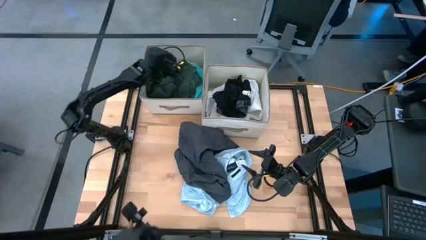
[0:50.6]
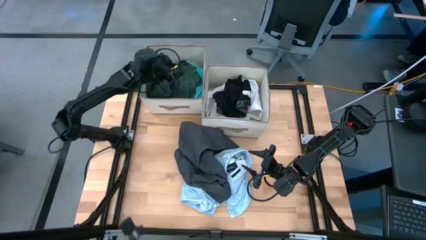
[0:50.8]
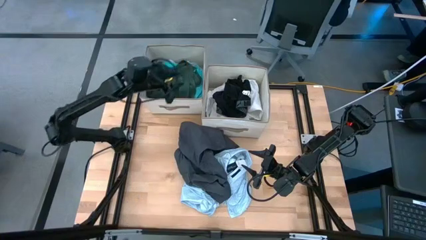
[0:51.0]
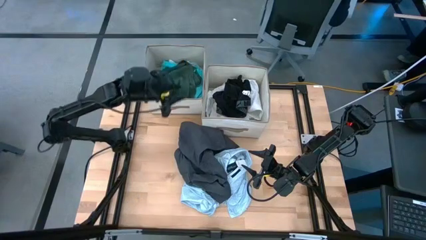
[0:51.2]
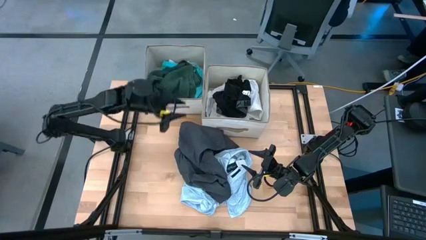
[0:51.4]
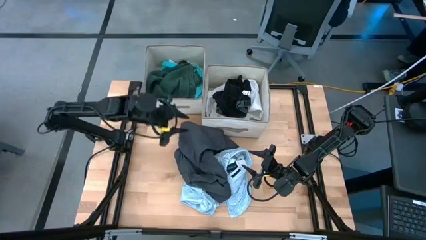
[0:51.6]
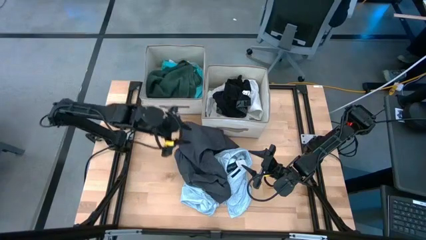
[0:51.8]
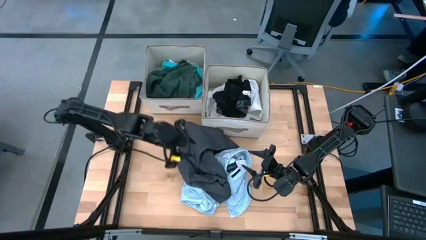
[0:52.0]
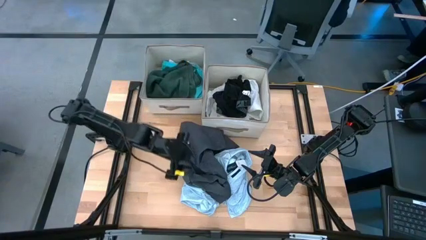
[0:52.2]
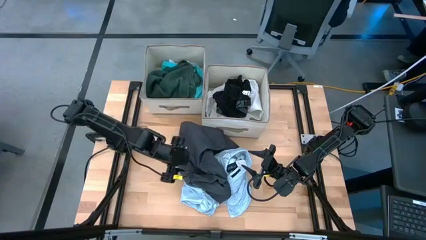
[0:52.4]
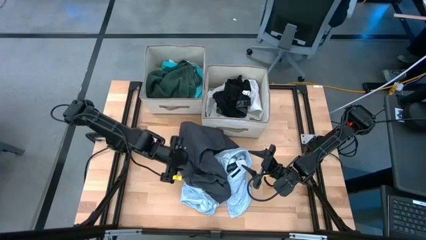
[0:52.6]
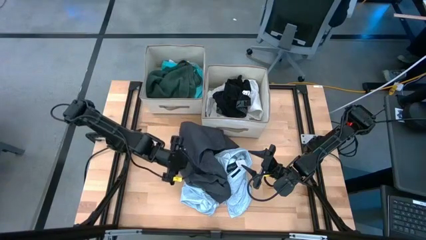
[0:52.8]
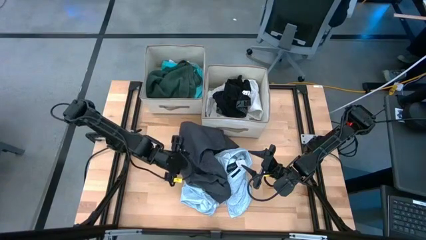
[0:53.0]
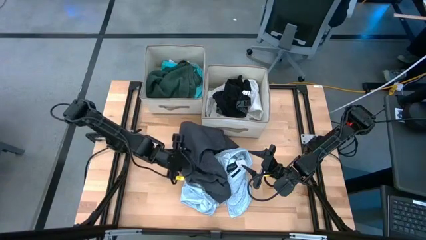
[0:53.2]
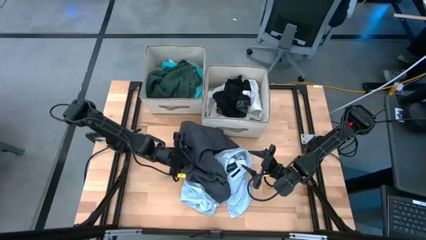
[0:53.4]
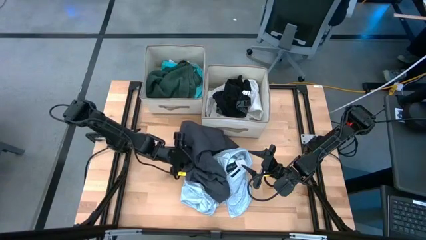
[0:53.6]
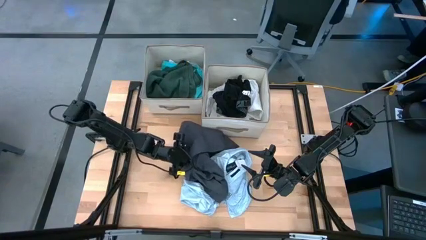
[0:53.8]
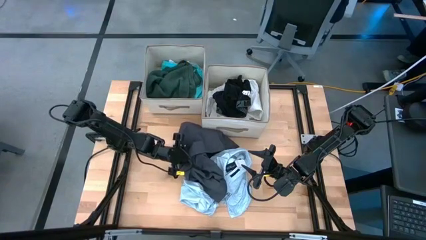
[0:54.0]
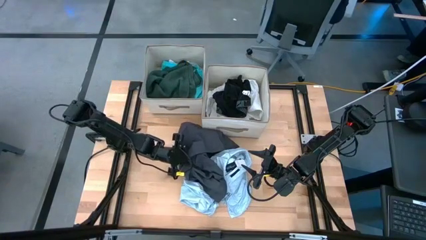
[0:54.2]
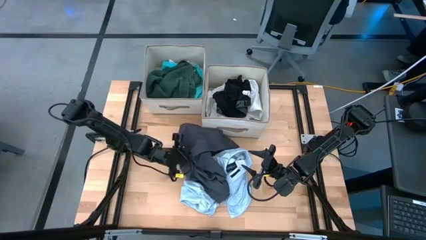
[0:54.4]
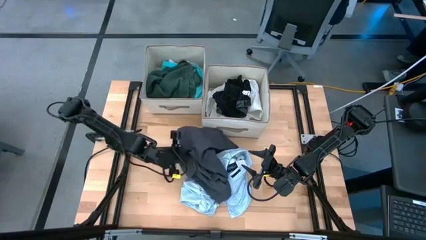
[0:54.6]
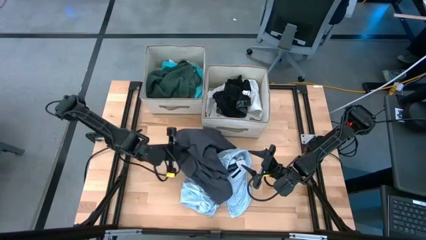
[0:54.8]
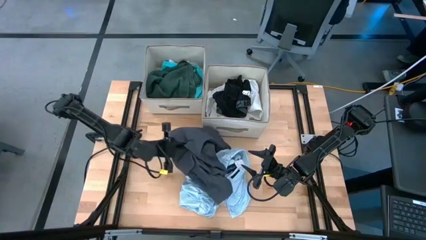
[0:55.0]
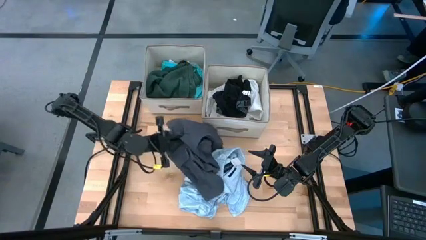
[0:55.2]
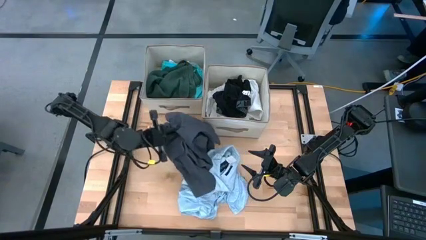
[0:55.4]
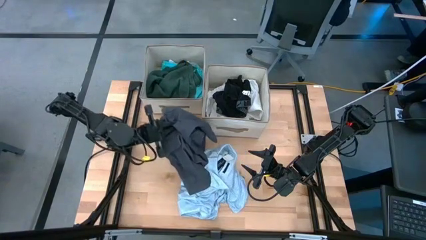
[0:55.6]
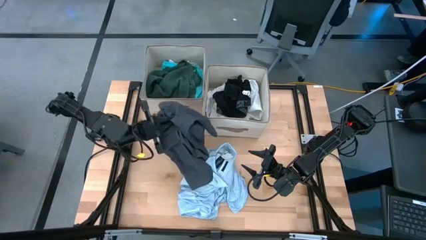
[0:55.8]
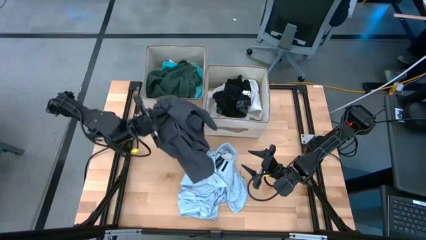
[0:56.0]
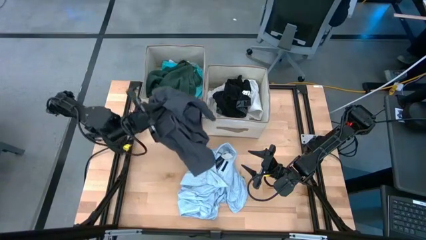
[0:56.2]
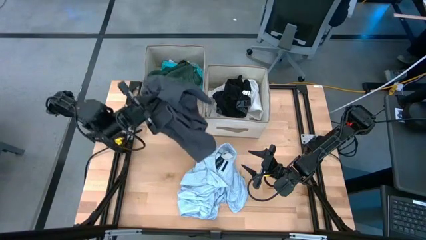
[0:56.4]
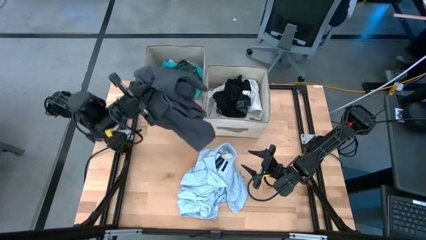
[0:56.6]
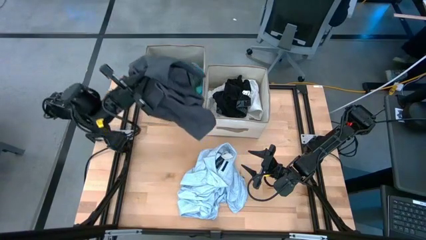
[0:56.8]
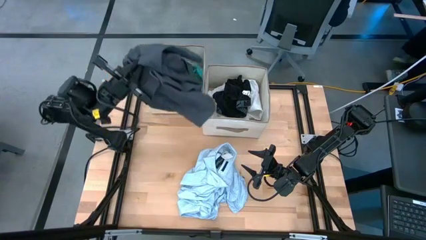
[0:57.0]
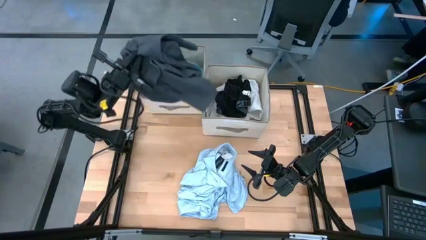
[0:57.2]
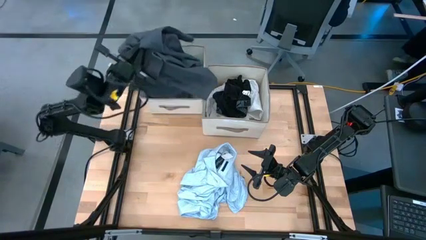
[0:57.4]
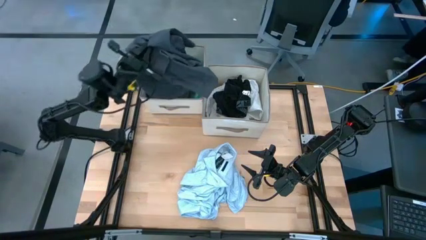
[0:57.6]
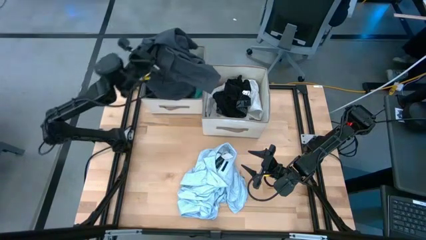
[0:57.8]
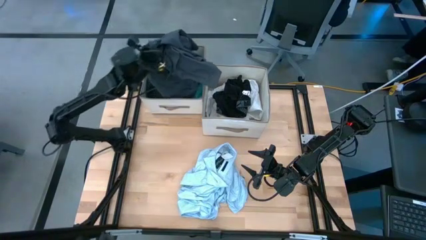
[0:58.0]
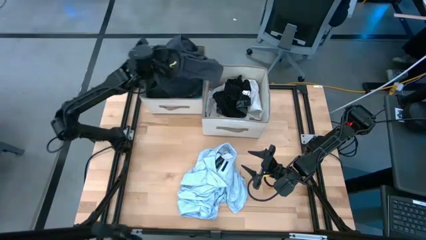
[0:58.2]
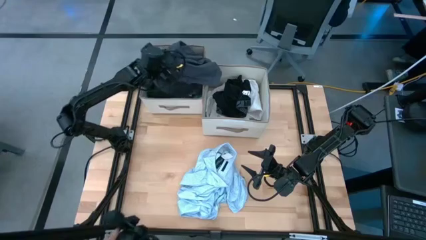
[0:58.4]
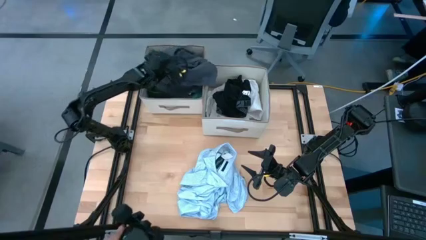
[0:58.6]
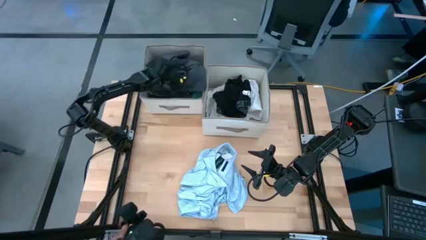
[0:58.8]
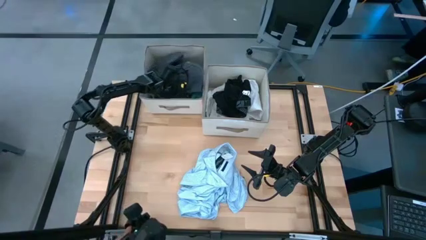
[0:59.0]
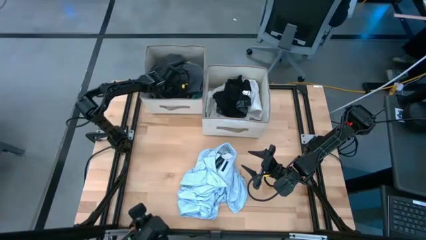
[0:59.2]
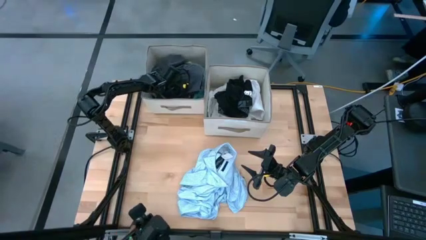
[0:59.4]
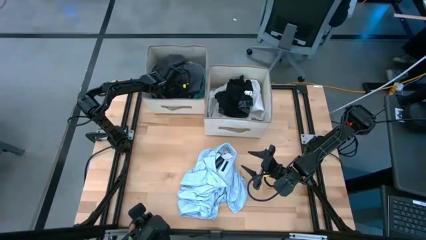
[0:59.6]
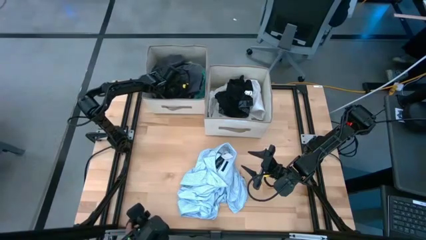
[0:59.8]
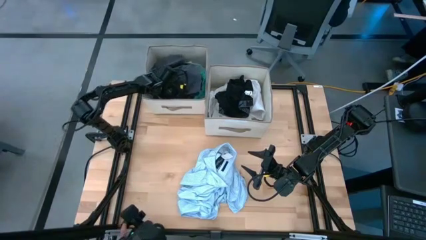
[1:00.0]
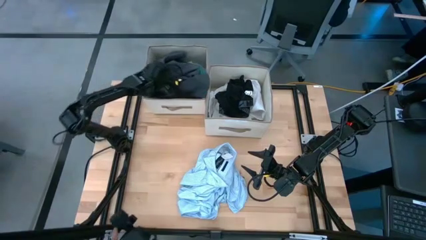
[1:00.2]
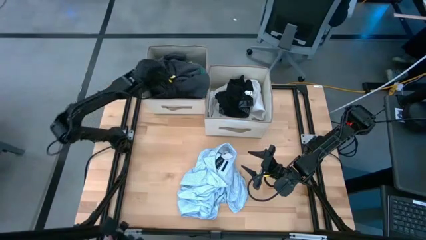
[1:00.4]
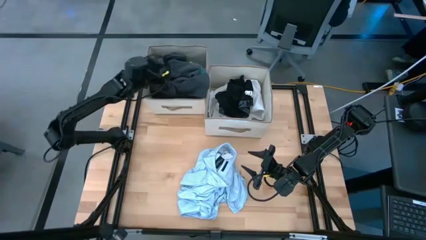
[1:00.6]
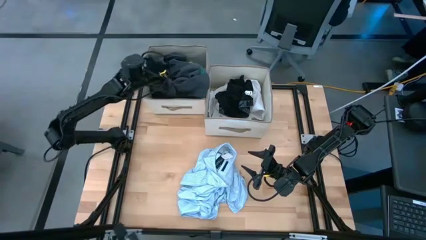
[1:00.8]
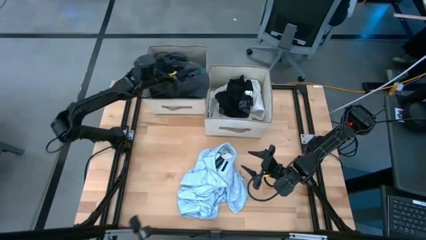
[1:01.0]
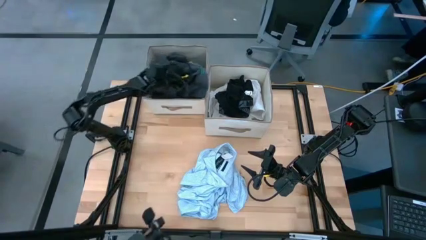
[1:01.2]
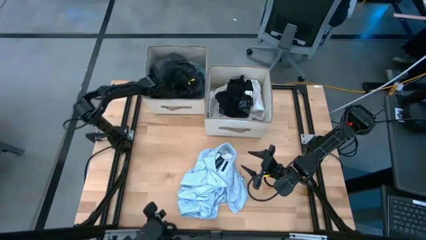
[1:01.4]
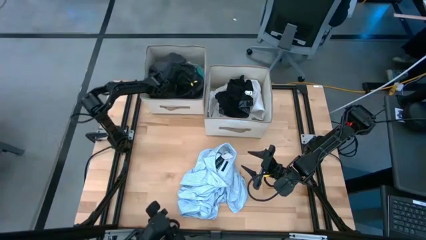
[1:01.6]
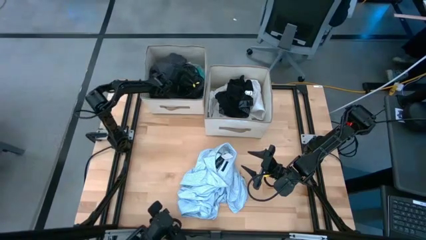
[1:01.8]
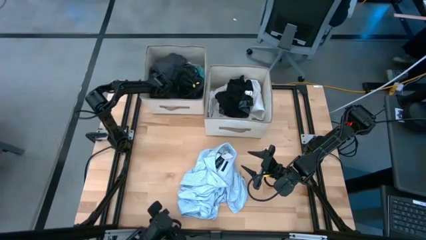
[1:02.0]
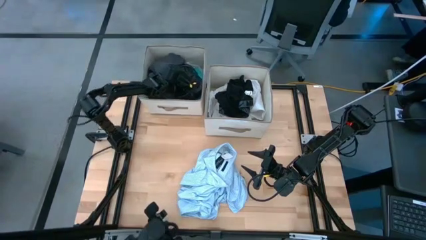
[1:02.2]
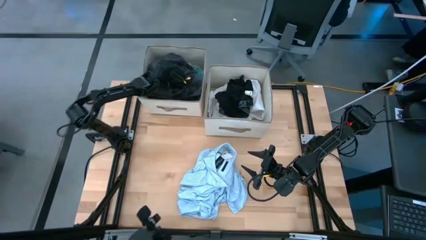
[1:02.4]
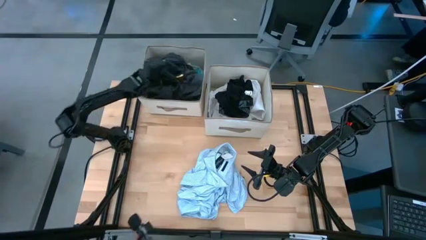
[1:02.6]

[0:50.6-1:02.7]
Task: Sort clothes
Put the gray shorts into the left laundry organizer
